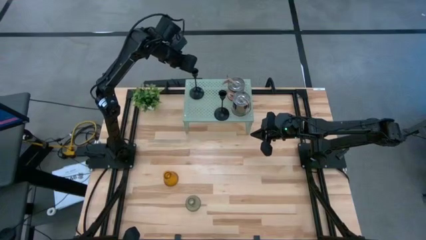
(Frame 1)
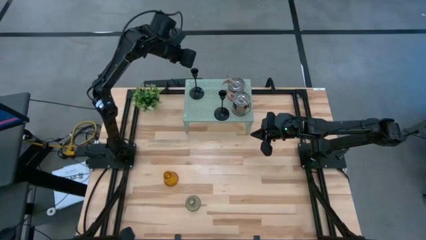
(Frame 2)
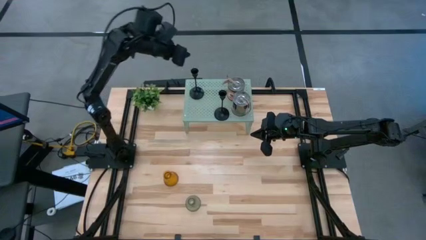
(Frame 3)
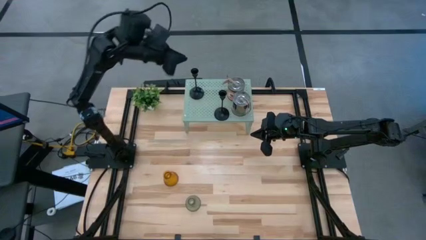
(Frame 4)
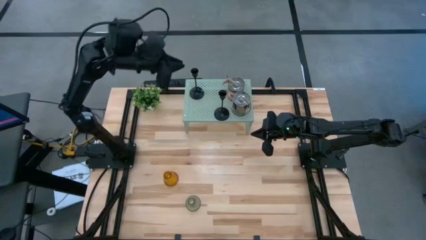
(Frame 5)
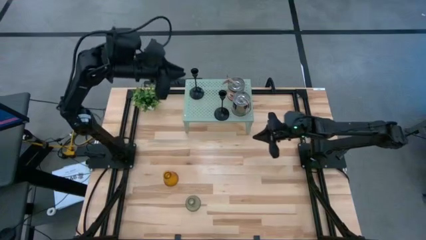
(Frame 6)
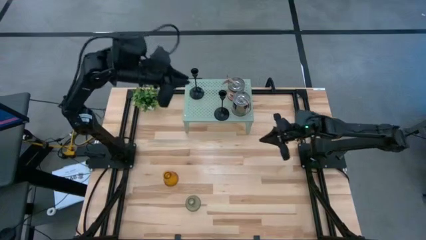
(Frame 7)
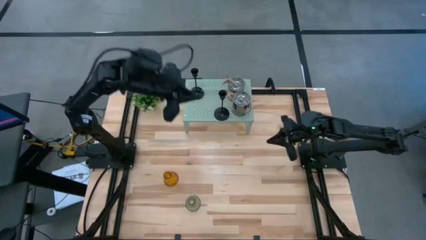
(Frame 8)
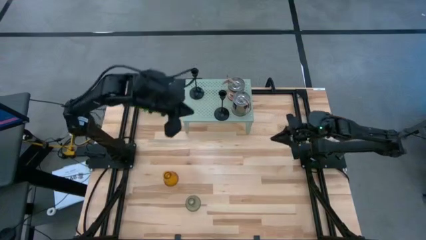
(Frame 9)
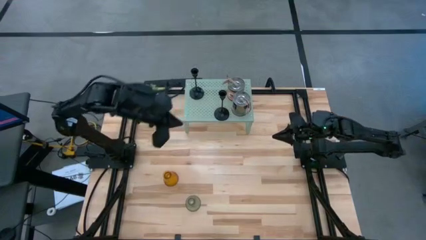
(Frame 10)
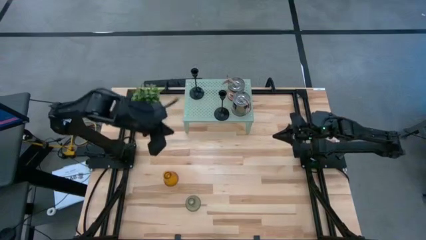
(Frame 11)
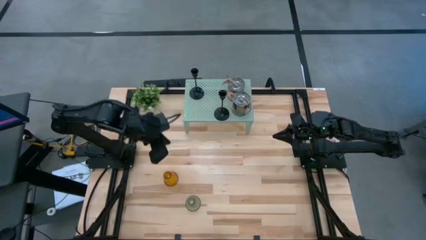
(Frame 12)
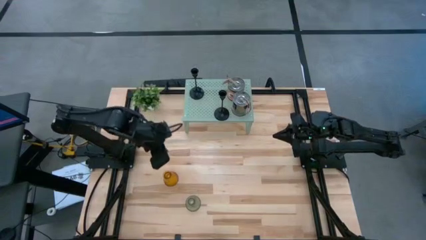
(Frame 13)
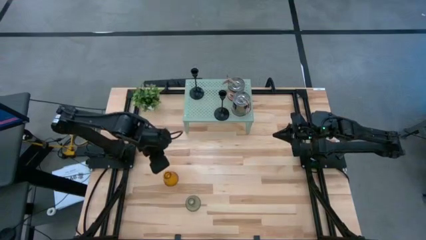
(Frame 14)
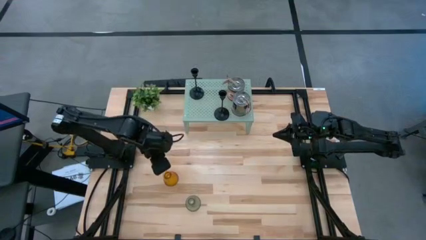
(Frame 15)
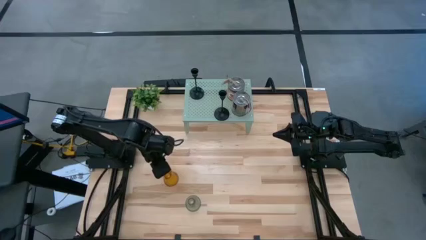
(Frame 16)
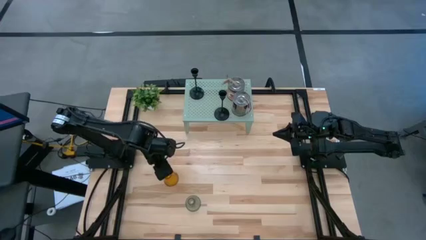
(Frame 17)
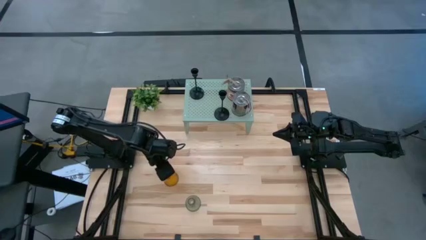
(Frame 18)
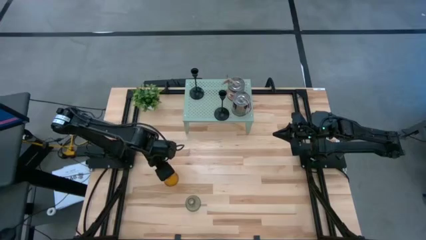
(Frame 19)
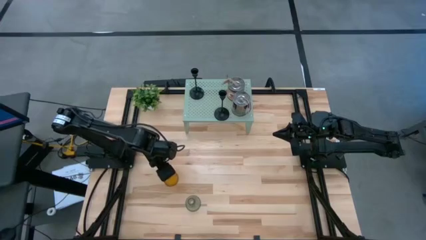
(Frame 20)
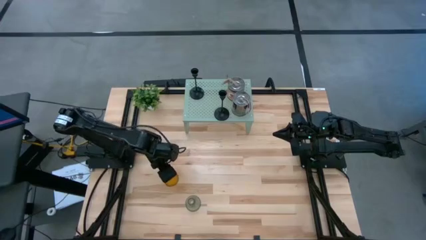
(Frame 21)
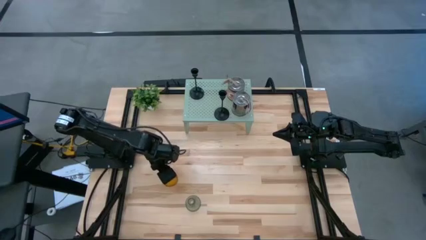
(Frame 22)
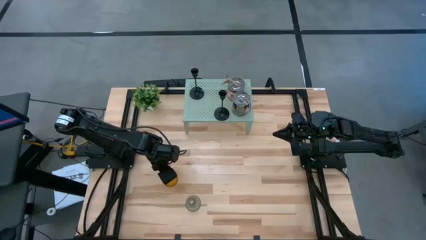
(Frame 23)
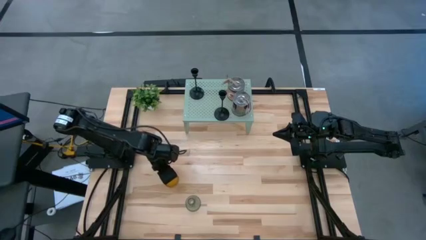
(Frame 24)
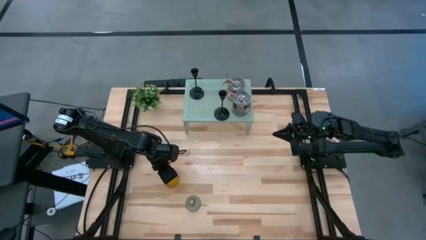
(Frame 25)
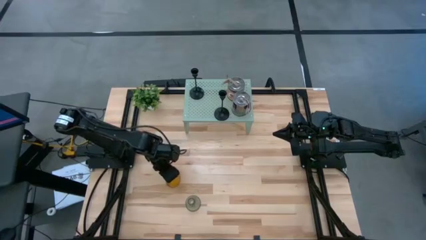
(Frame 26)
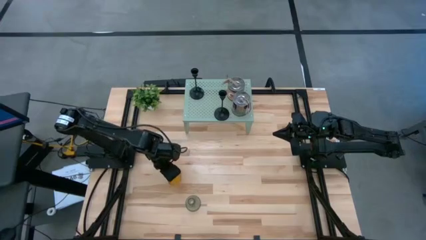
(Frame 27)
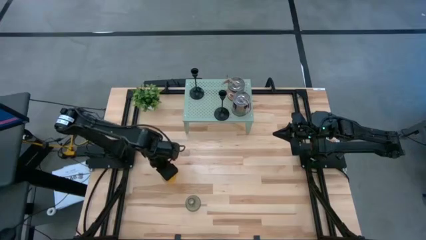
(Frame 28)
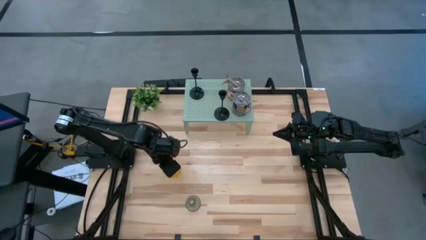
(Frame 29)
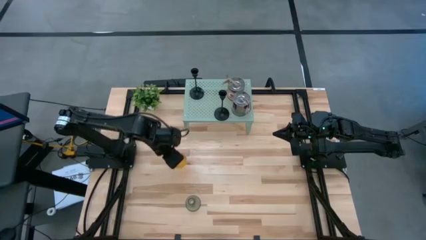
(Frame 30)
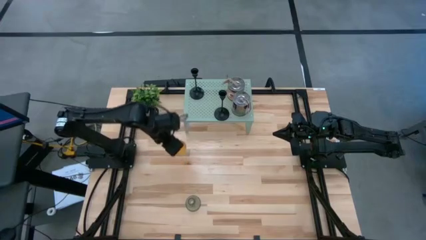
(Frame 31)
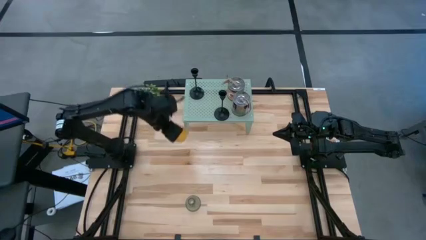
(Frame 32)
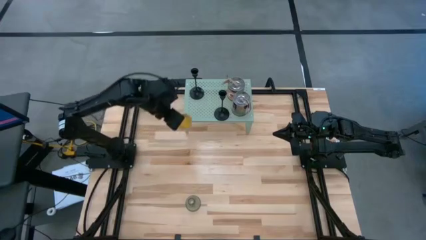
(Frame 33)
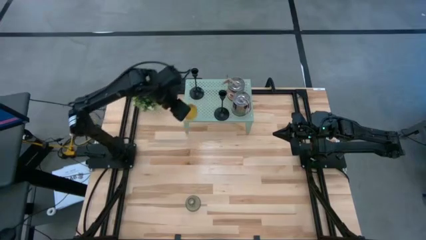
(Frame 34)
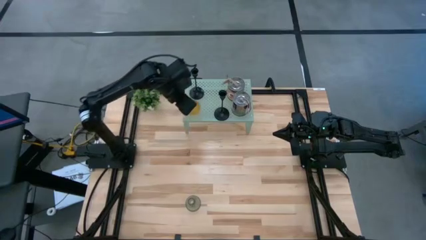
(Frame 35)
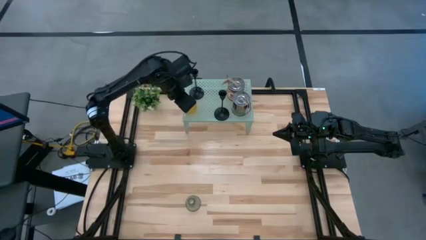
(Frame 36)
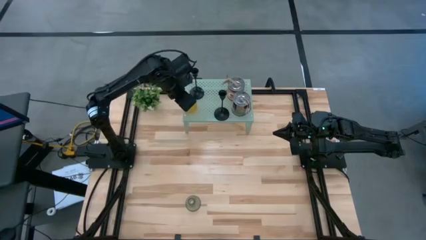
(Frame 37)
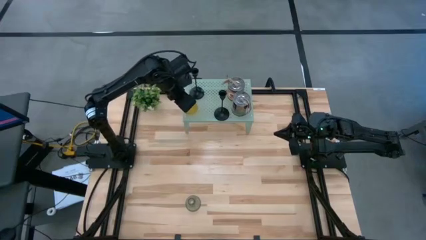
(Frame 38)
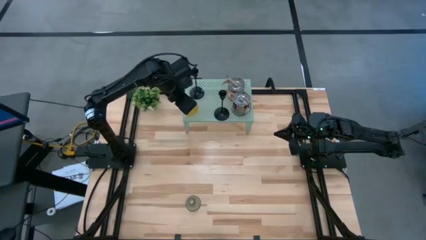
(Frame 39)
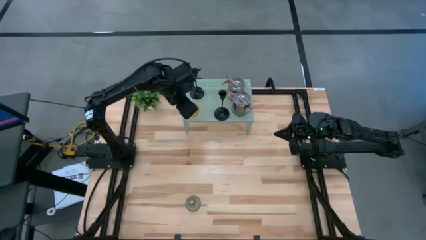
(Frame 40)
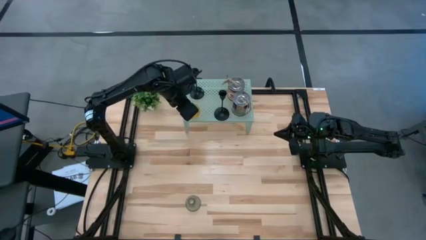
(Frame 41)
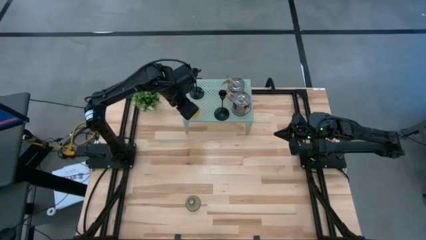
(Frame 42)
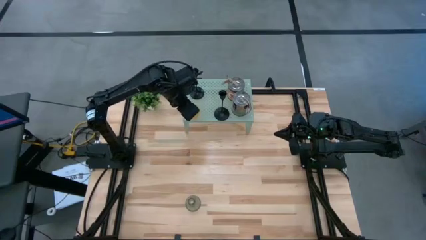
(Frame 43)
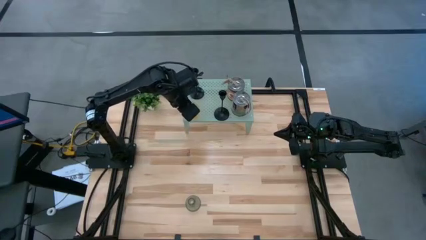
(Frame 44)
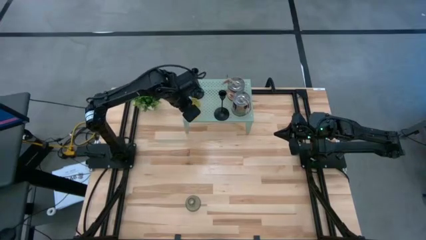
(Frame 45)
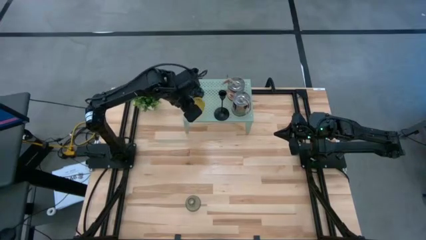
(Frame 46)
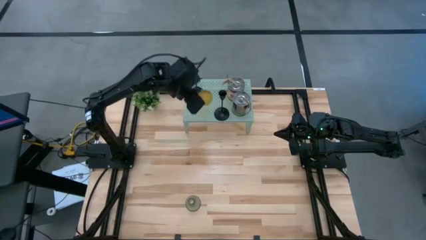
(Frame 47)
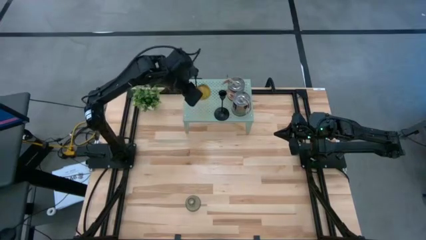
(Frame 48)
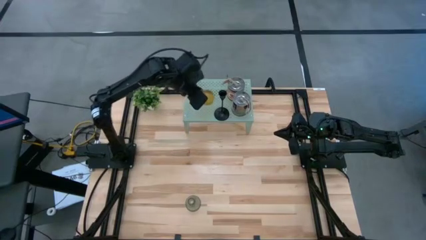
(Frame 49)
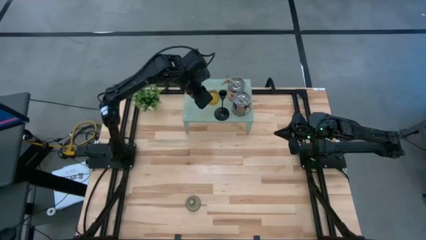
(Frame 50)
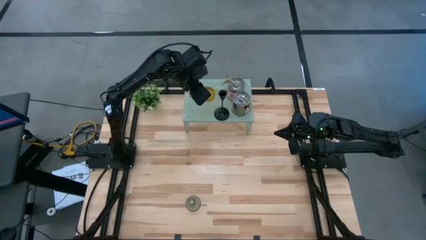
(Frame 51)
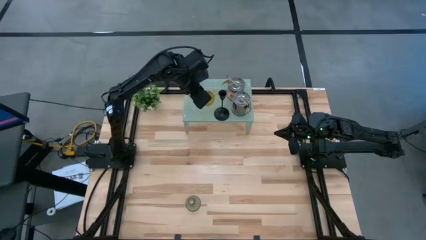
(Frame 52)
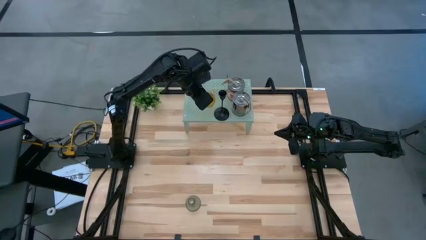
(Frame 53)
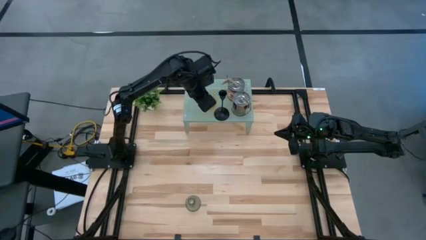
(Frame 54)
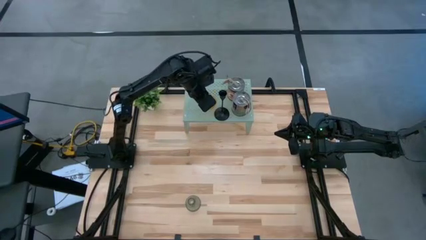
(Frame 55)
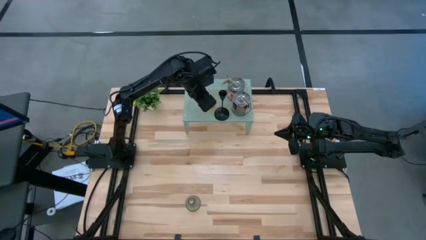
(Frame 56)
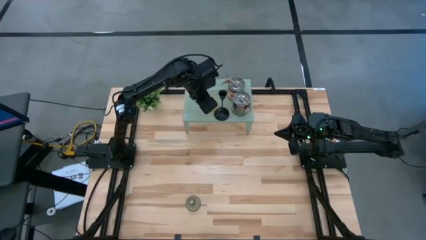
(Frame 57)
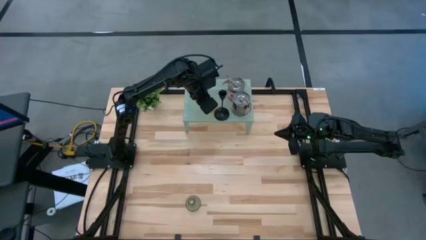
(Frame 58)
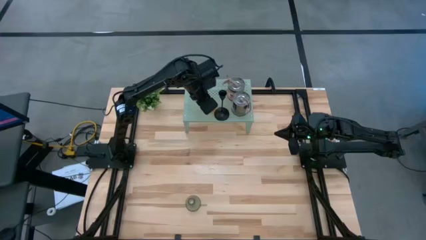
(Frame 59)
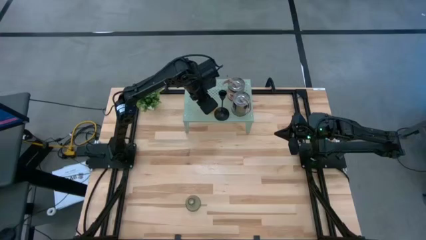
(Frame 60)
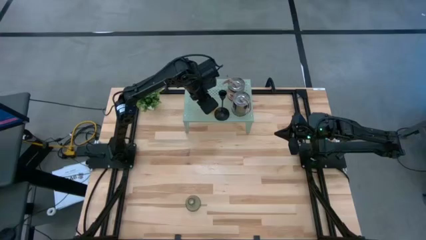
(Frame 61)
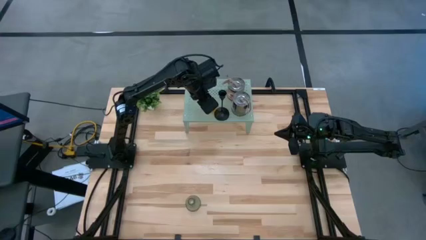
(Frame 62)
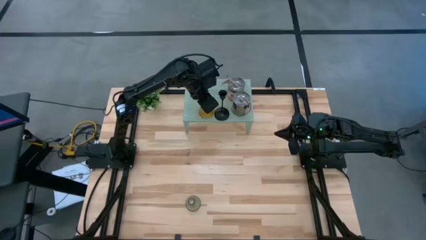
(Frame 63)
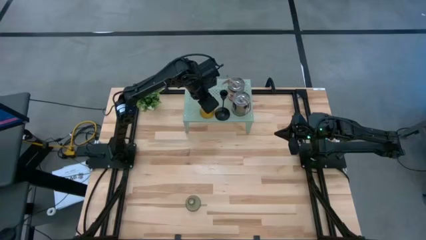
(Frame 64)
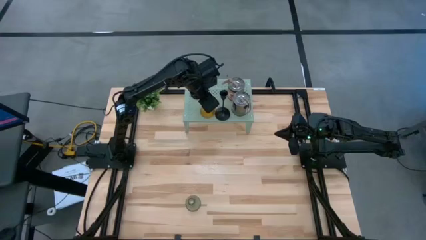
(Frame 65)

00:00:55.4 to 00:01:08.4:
Task: Pick & Place candle stick holders
Put the orange glass candle holder on the shelf
